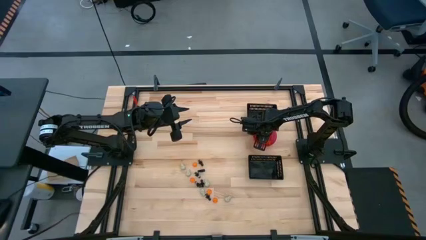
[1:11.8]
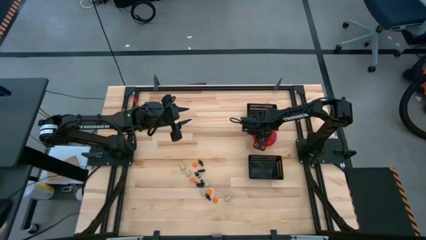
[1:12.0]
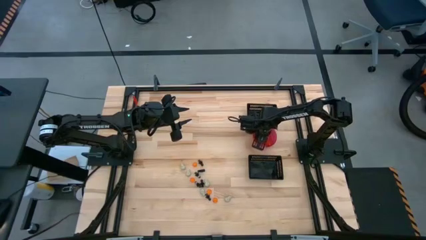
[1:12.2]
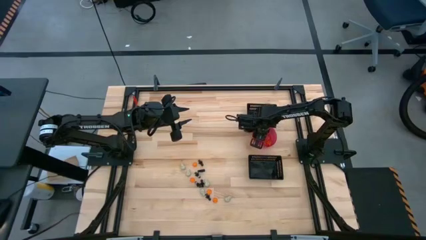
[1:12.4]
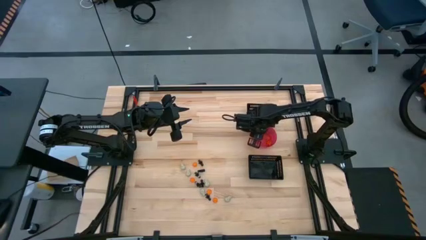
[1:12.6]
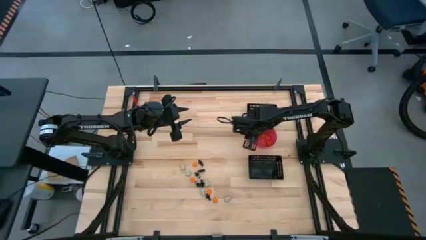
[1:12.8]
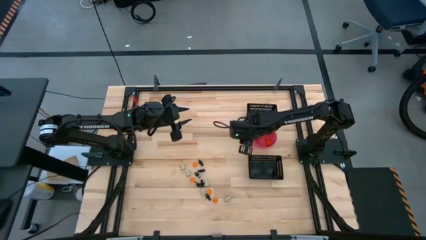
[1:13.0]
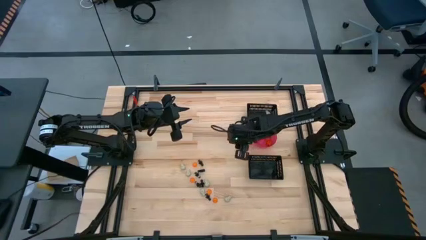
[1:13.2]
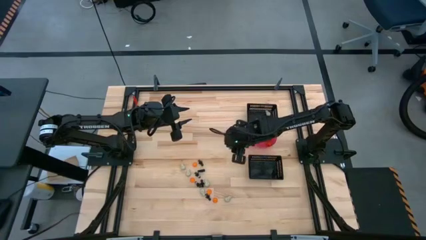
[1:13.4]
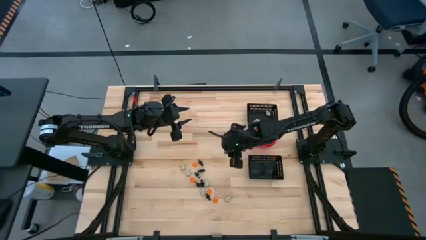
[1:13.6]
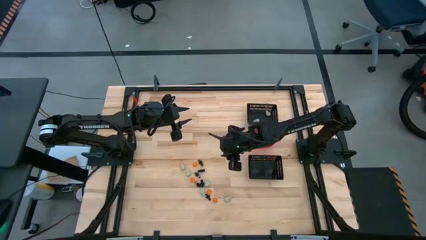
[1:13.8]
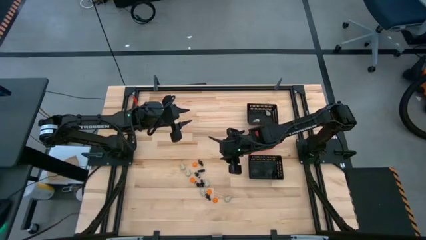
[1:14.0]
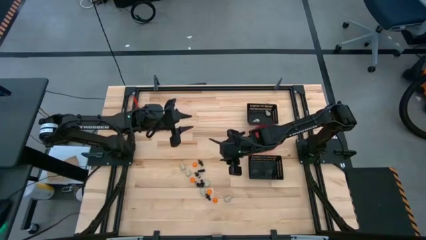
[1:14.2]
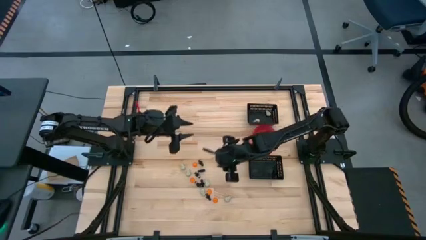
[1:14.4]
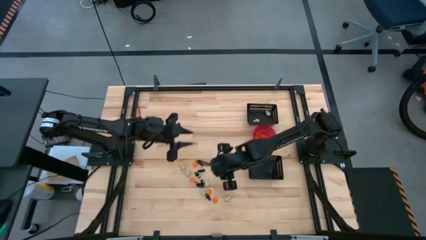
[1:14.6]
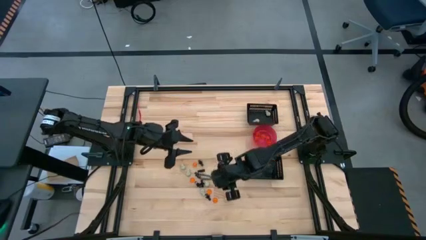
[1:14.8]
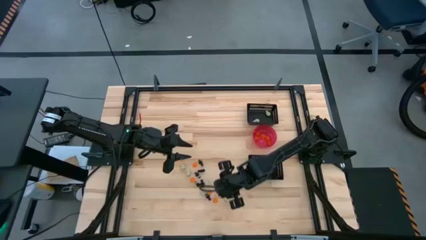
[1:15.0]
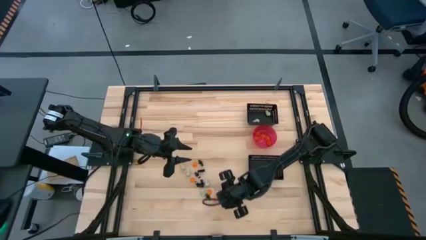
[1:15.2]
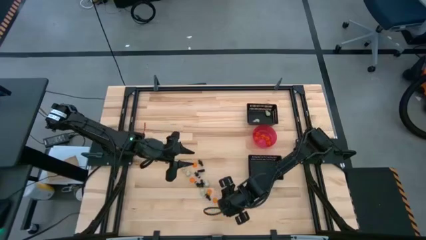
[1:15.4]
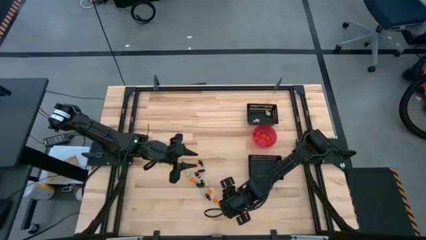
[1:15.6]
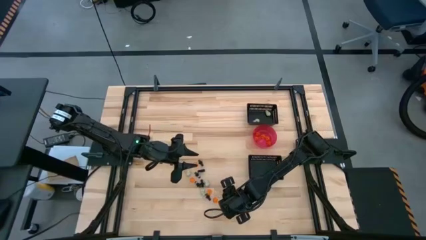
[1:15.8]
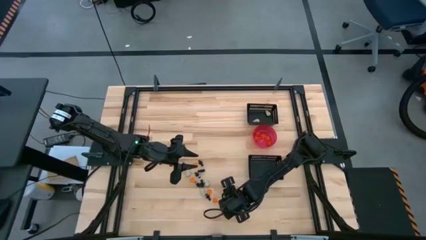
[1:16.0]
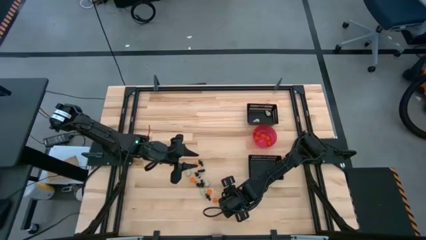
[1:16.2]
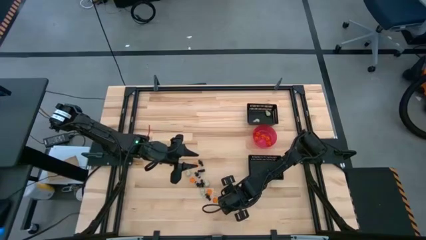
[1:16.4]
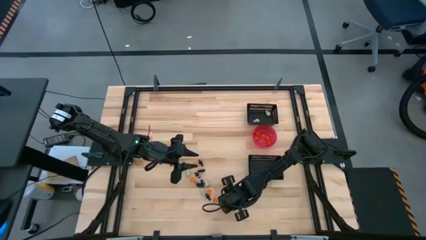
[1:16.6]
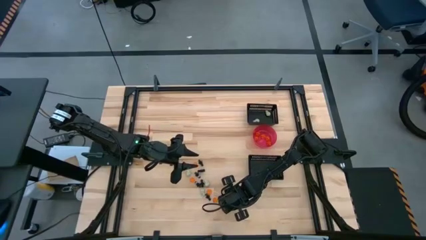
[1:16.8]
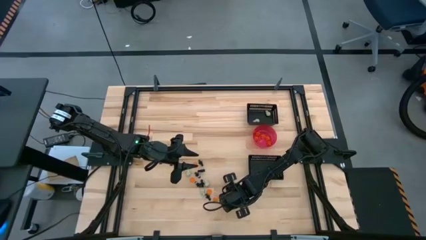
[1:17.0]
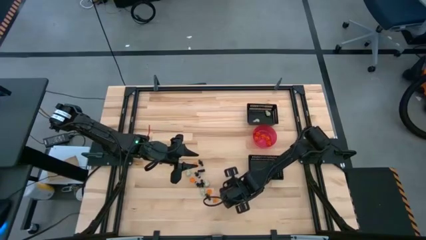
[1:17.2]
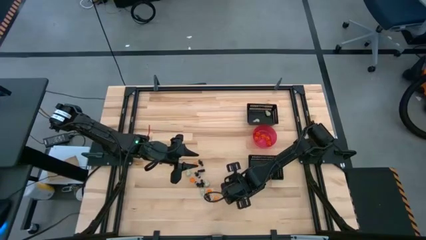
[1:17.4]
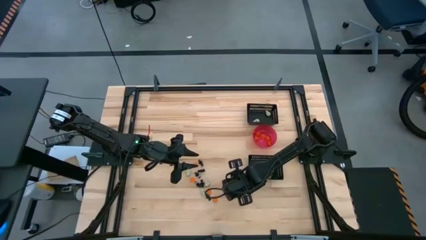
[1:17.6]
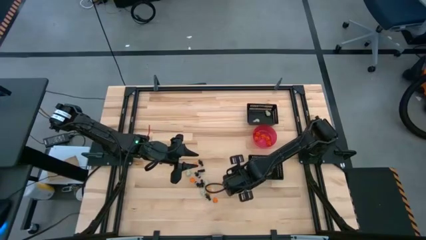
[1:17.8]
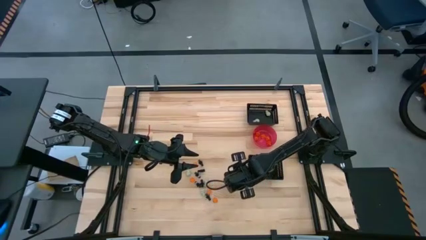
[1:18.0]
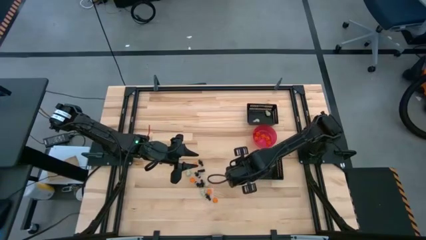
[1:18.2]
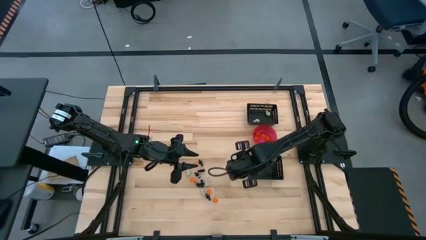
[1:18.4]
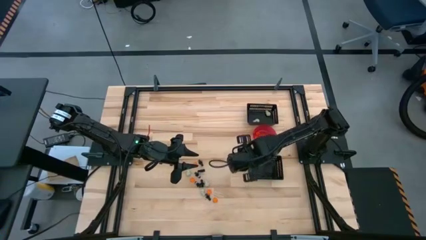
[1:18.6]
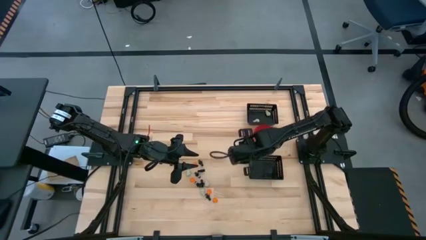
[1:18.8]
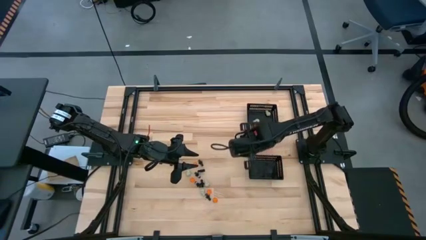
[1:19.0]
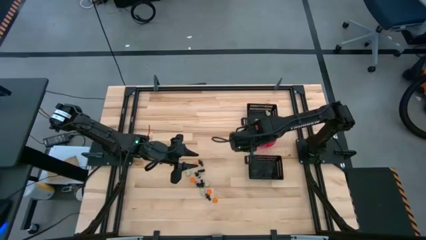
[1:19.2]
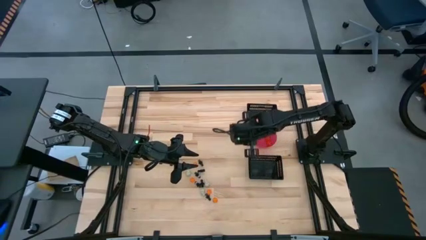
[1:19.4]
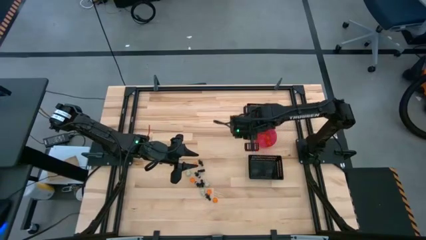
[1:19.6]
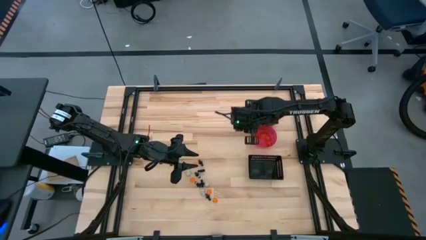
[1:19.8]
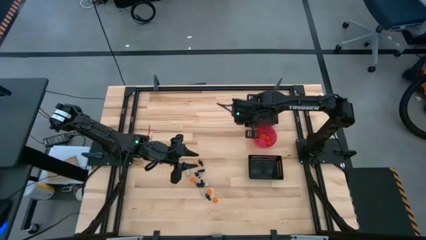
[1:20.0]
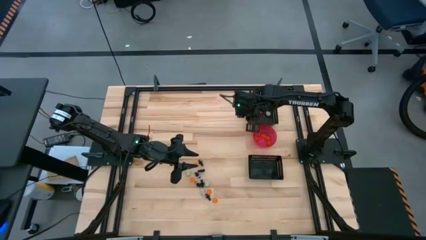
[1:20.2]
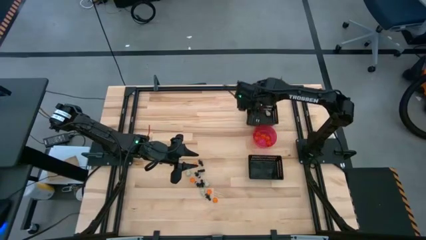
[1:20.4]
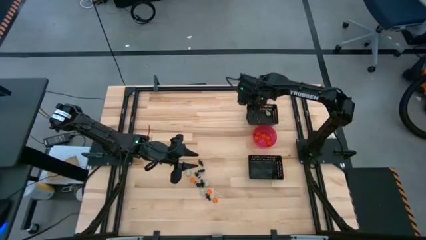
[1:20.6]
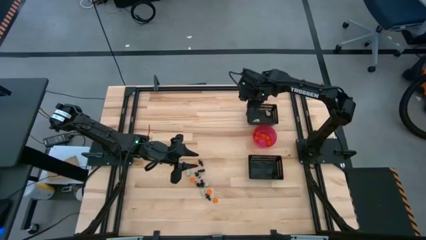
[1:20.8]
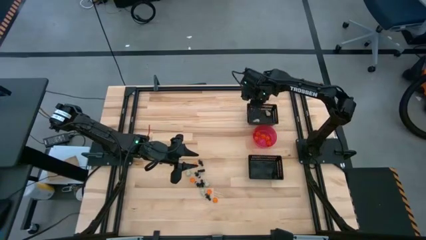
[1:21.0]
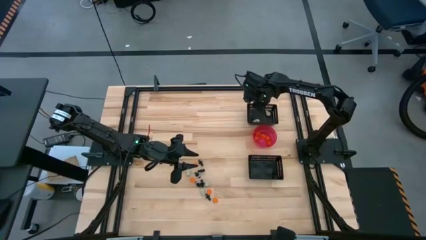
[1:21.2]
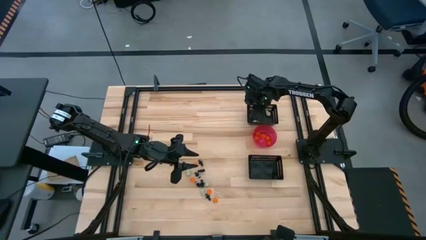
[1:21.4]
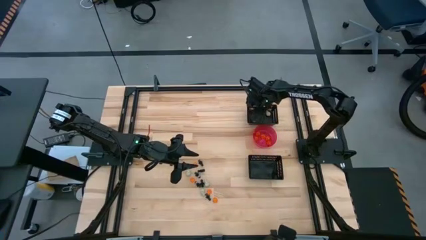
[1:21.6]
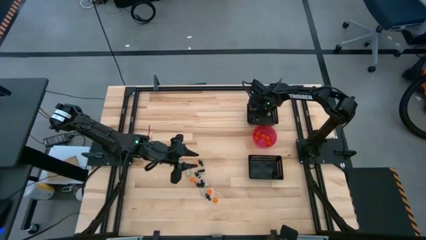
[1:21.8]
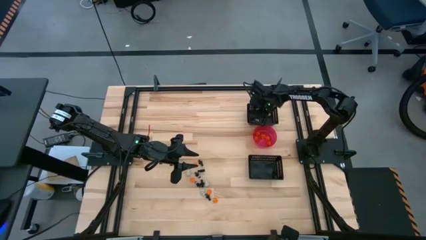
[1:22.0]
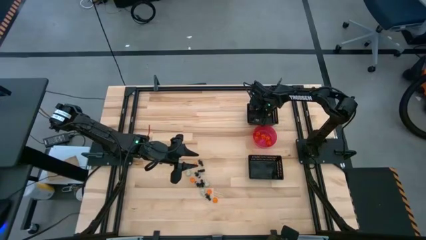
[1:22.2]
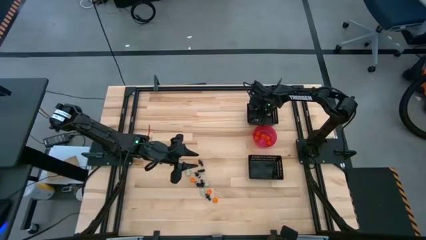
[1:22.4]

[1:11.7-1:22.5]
Task: Sort Halloween decoration
Put the white skull toy into the top black bin

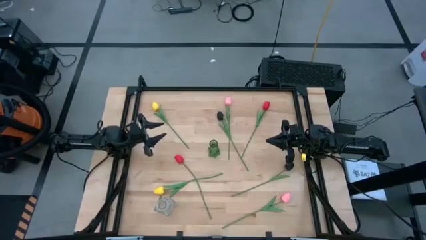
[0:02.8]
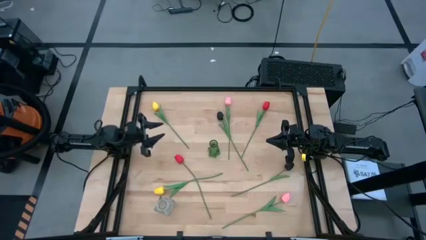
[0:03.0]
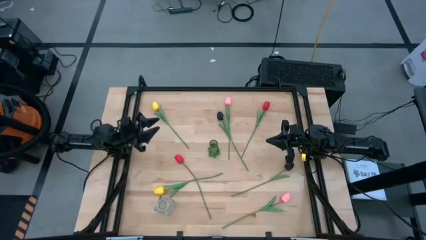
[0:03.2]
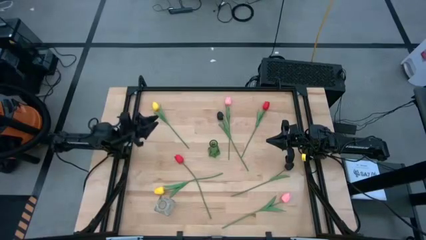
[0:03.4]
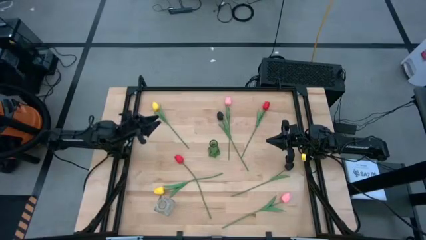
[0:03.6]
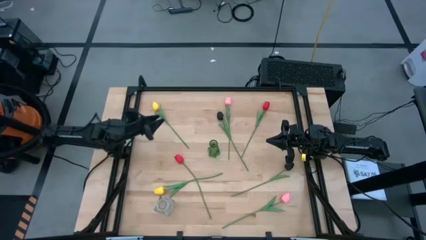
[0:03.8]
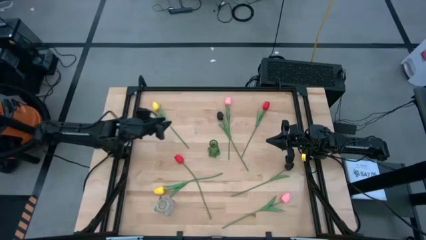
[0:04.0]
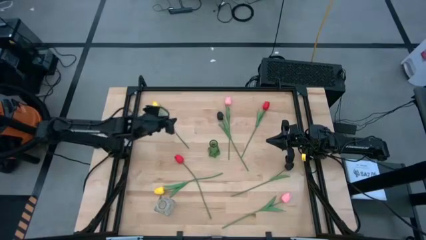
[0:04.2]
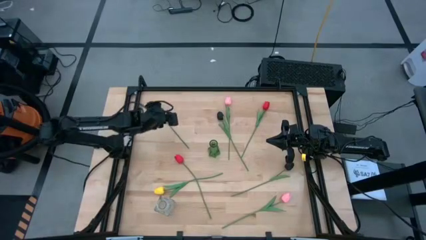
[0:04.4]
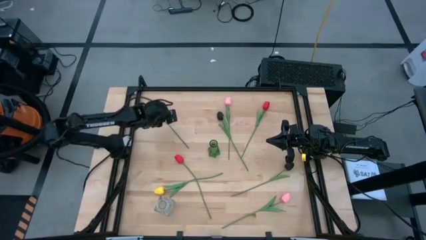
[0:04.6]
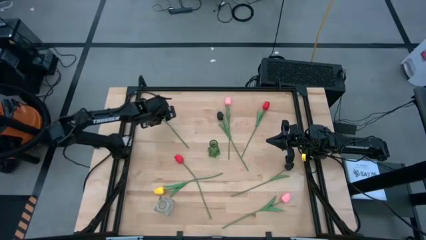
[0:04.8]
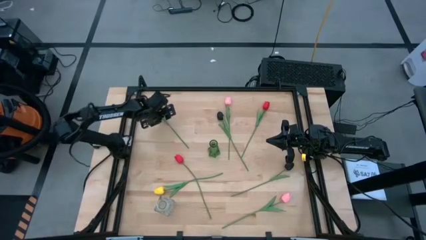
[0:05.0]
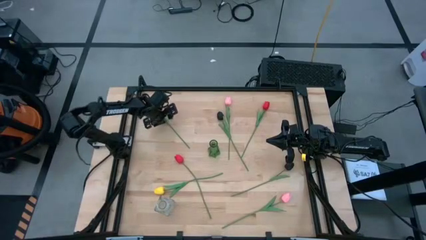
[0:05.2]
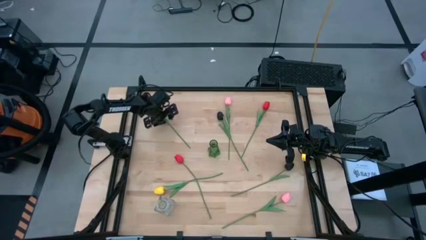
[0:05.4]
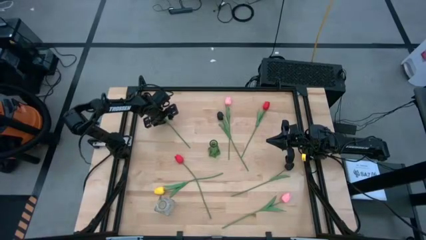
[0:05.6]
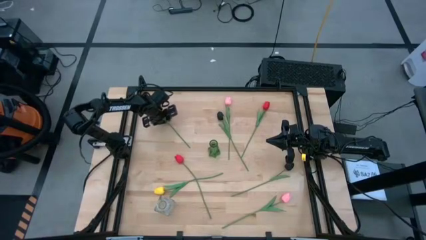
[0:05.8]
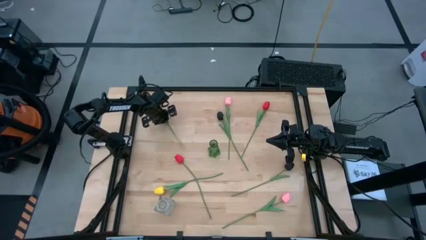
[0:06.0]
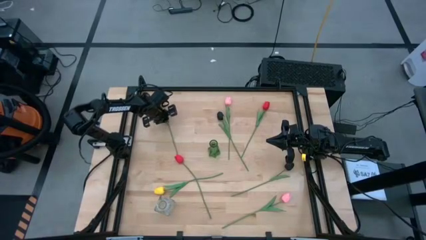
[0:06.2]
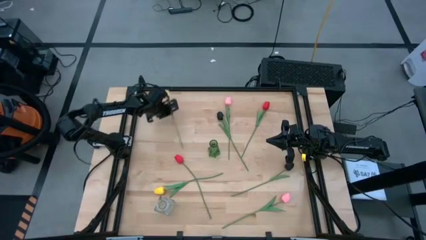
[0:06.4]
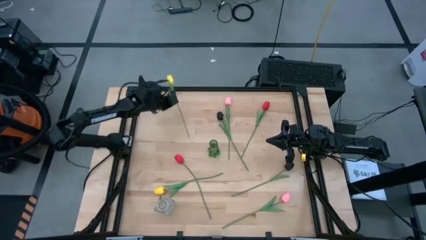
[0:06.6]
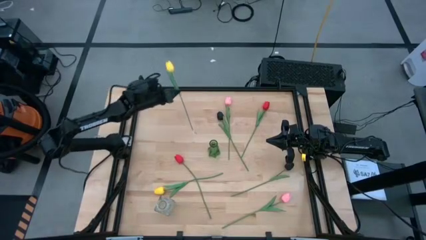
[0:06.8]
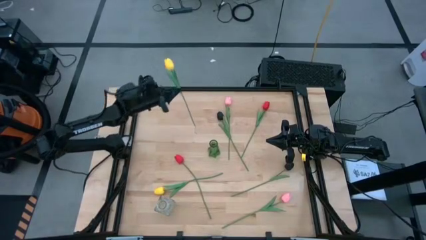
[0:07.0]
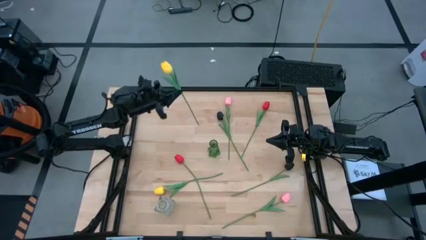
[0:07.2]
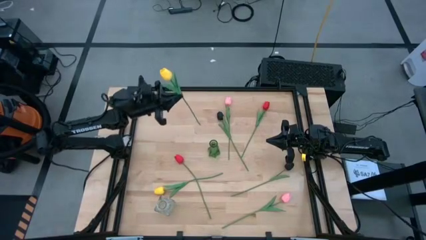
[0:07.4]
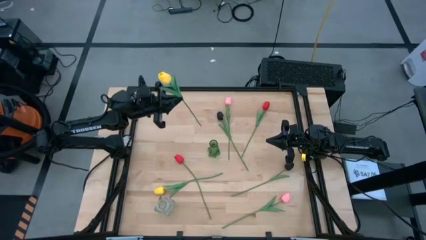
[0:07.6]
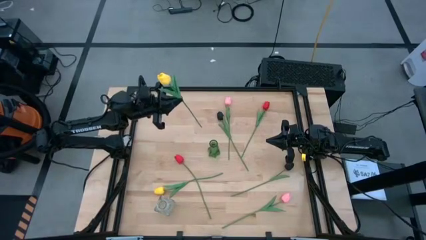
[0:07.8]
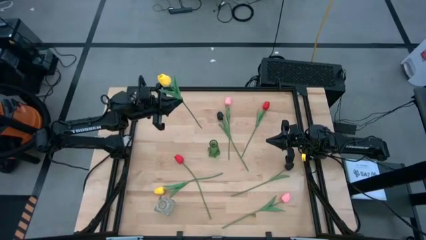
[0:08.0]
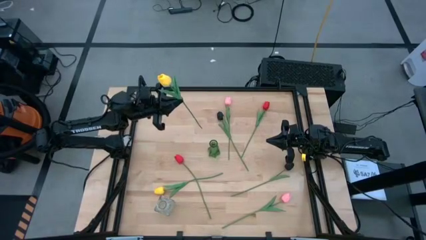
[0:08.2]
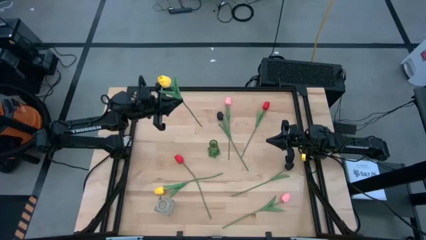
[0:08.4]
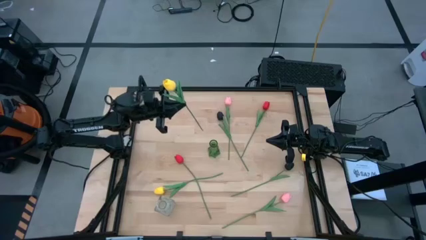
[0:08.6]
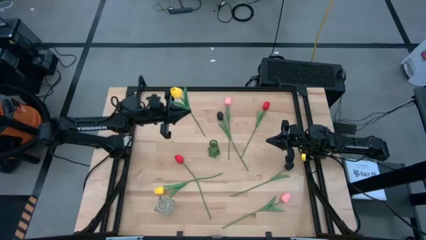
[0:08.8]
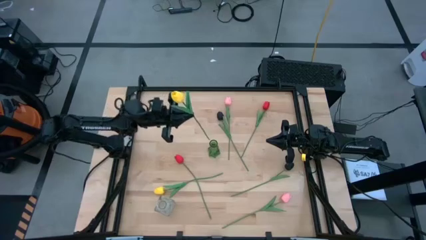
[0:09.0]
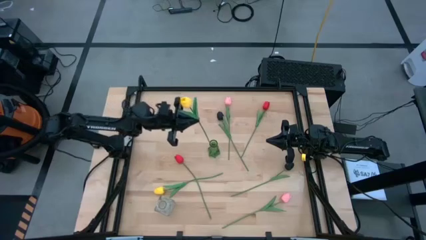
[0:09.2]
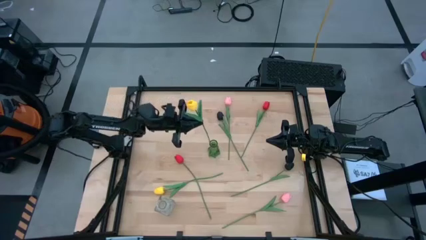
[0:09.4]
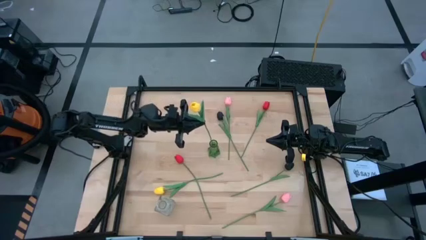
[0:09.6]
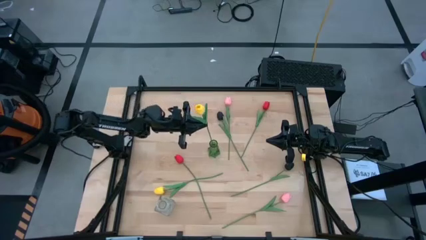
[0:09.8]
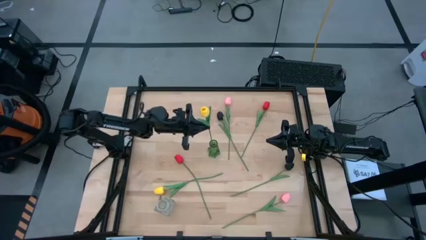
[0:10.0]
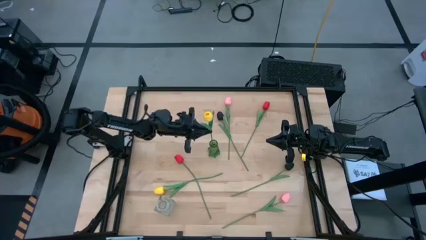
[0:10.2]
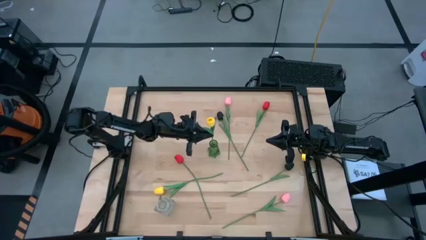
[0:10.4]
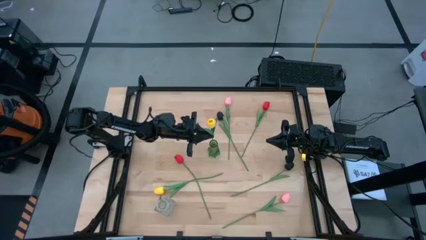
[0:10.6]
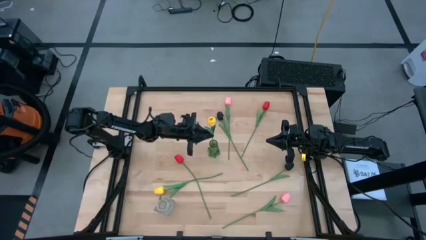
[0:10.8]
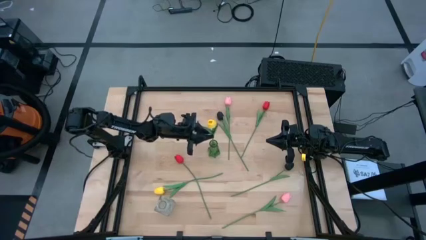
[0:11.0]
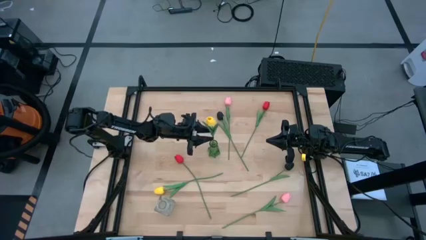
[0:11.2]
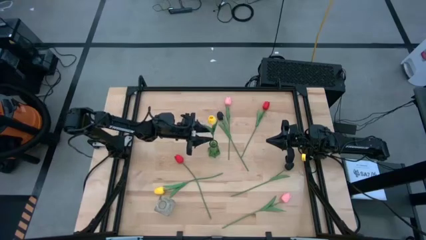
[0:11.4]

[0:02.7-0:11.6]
Task: Sort flowers into vase by color
Put the top yellow tulip into the green vase
